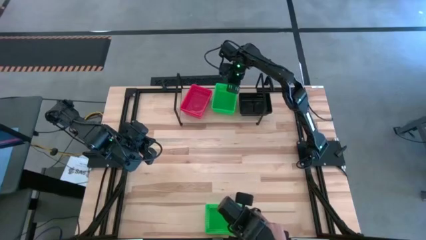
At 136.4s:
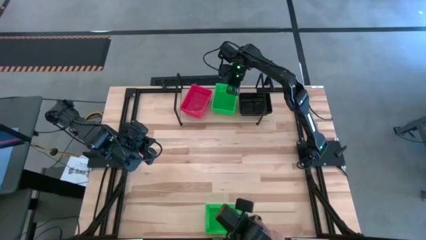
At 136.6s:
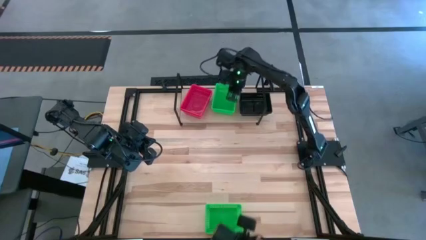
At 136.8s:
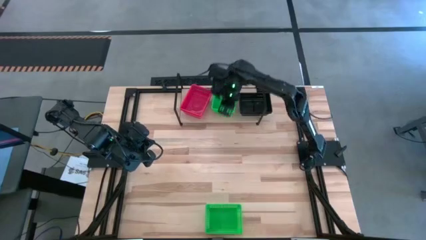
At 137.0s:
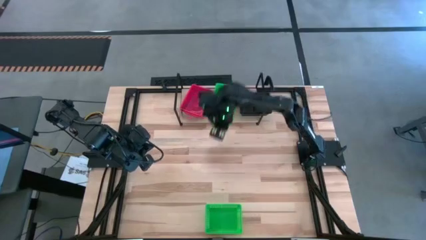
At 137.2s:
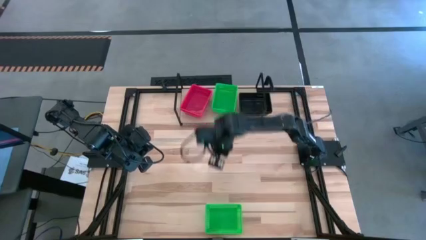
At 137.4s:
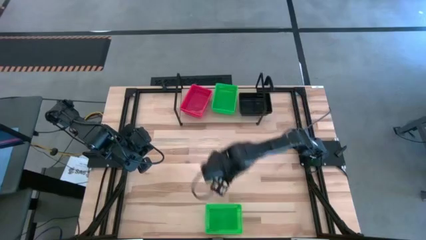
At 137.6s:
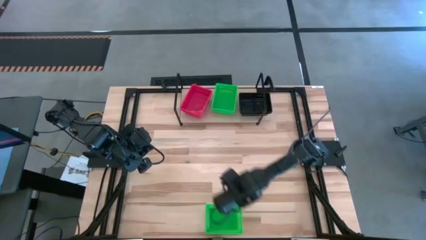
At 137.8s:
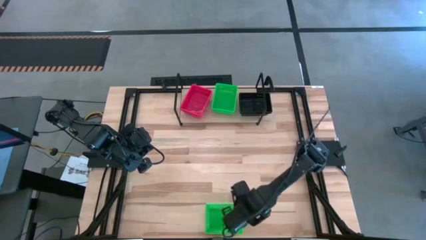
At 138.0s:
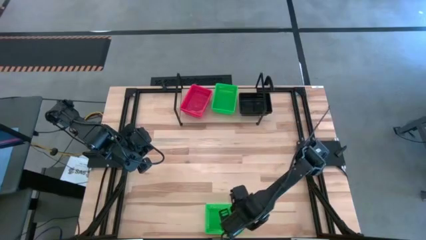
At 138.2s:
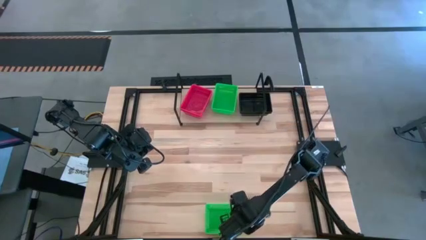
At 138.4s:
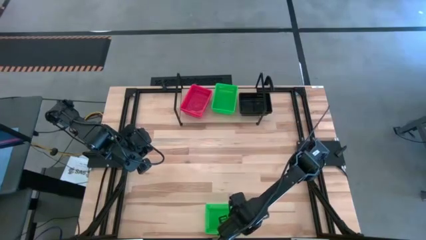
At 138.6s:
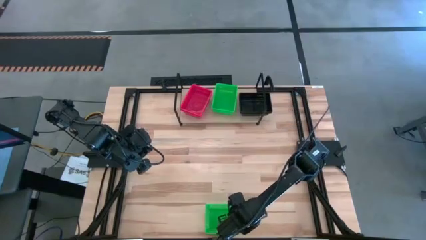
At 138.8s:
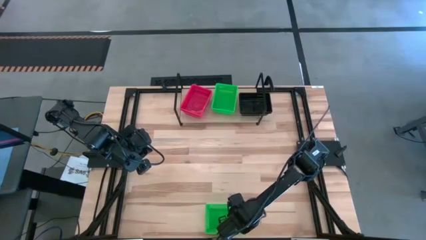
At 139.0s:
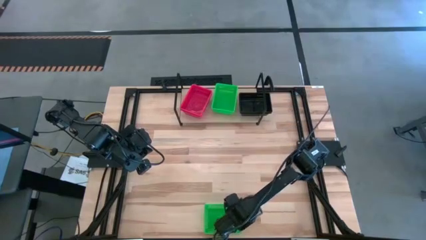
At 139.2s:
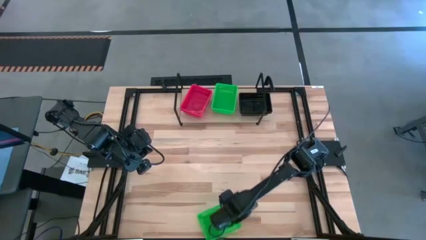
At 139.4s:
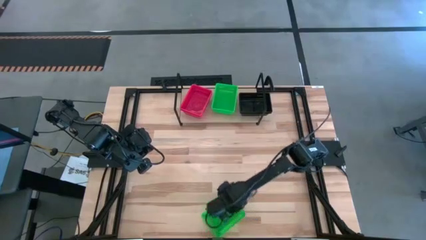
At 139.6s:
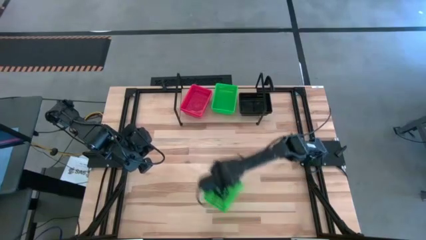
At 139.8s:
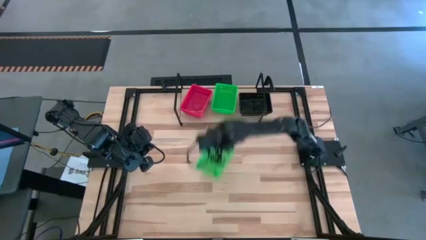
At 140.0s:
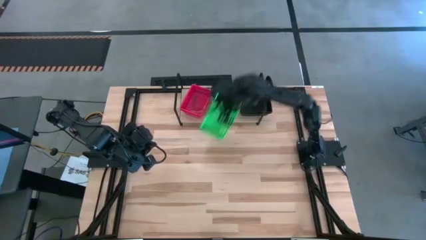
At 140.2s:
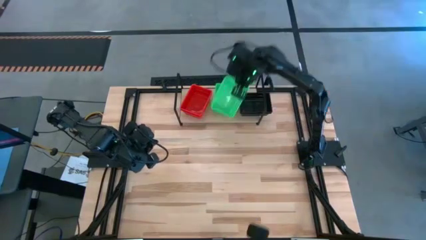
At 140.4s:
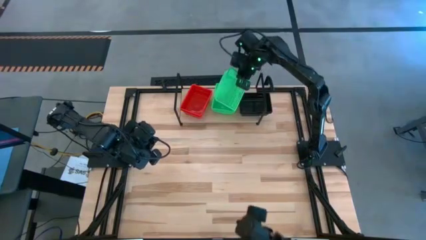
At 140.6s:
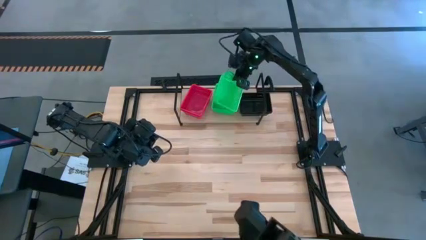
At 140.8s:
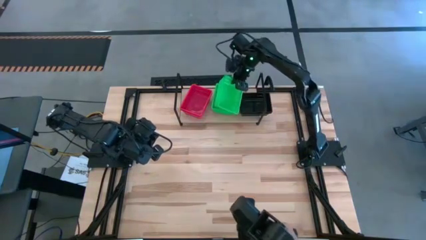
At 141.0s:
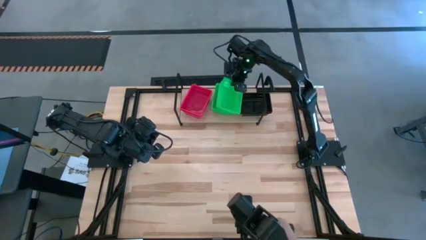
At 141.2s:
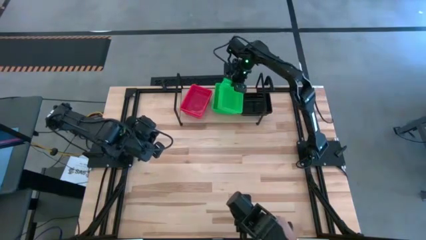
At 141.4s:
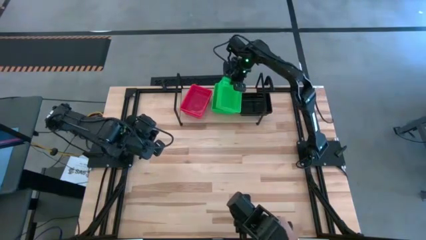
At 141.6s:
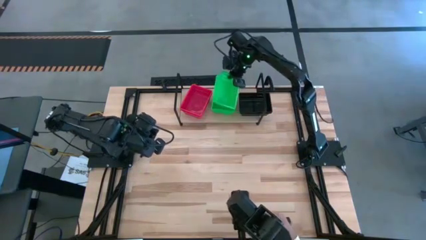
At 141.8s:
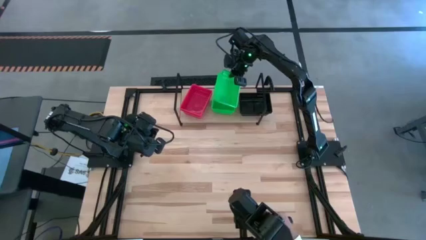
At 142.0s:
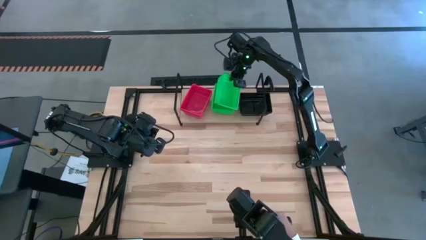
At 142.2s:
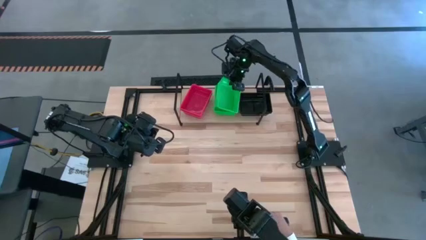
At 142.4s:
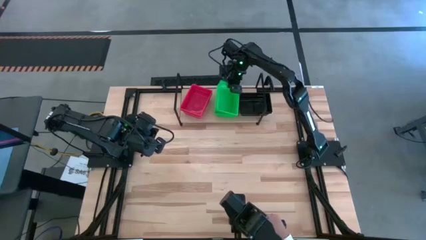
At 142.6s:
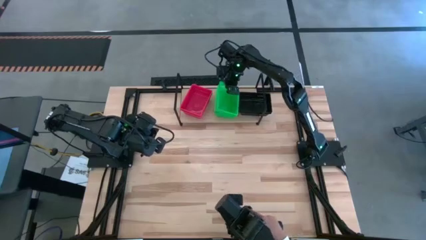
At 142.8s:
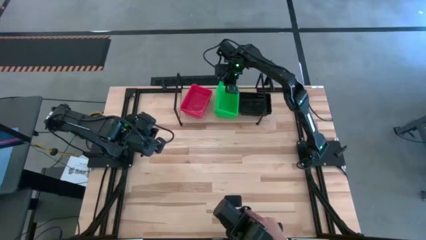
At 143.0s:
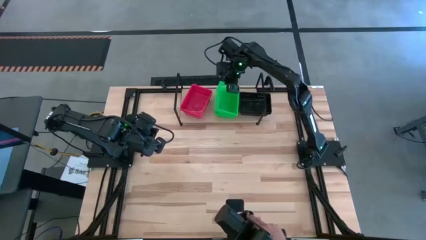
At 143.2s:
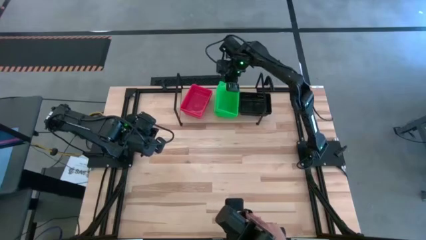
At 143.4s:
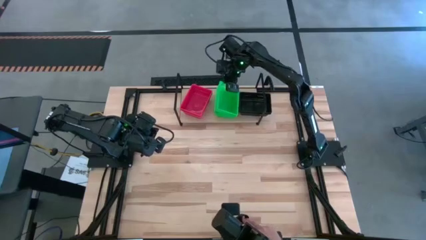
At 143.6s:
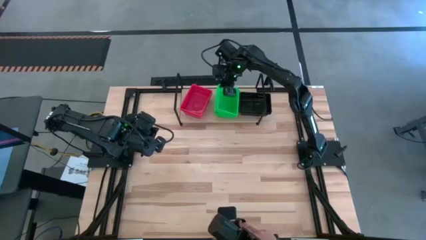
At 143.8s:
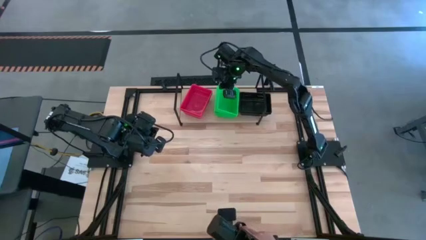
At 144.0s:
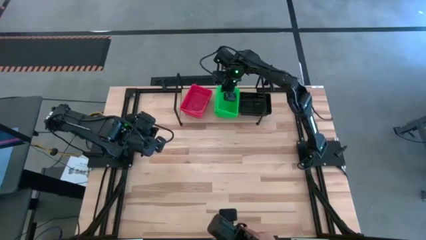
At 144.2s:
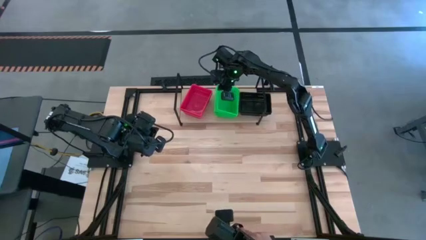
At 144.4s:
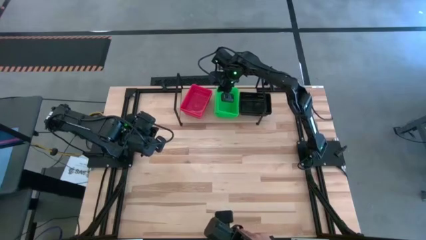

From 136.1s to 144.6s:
Task: Stack baskets on shelf by color
Stack the green bin on top of the other green bins on the shelf

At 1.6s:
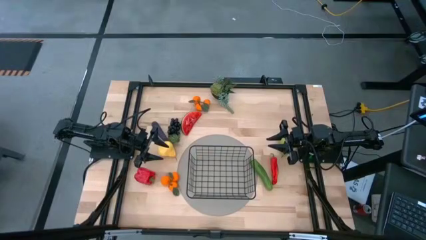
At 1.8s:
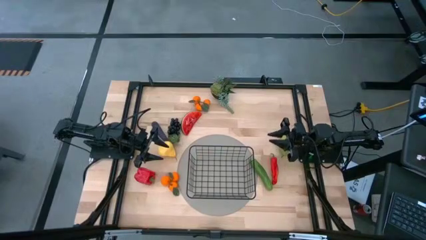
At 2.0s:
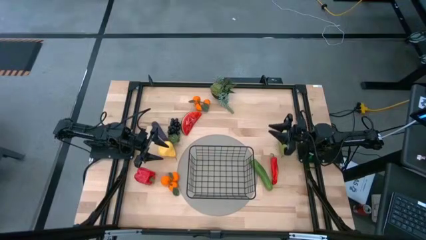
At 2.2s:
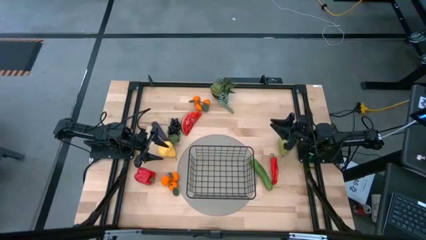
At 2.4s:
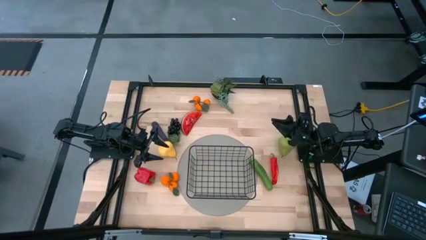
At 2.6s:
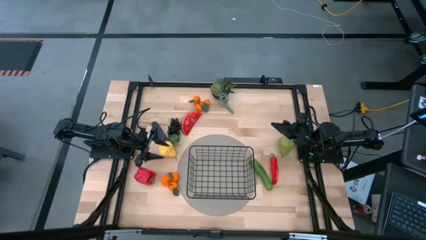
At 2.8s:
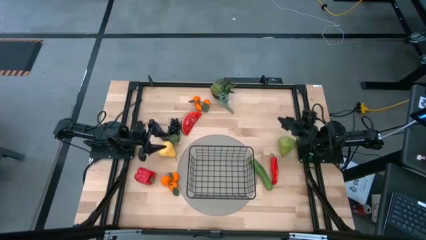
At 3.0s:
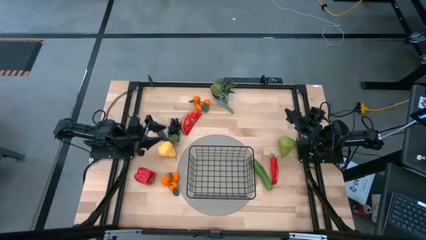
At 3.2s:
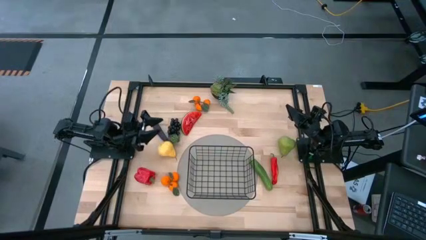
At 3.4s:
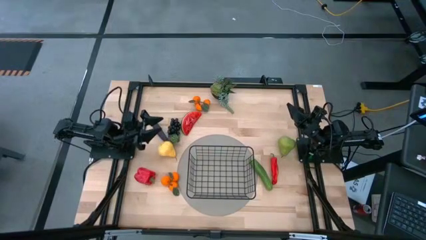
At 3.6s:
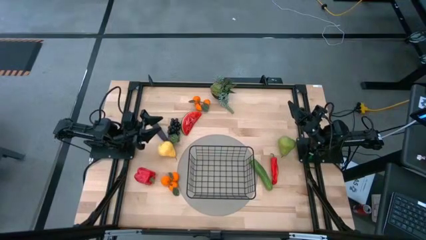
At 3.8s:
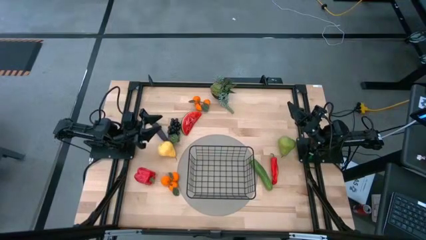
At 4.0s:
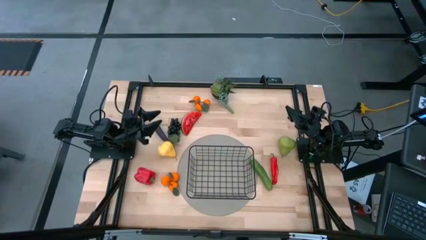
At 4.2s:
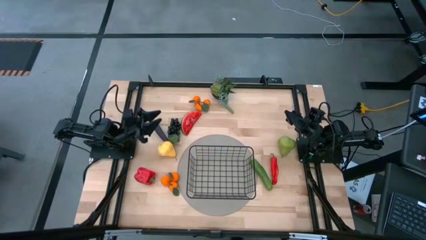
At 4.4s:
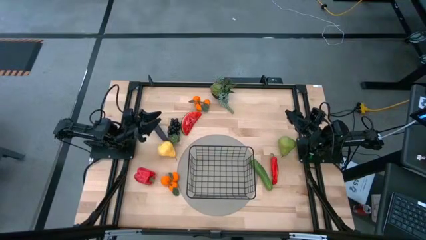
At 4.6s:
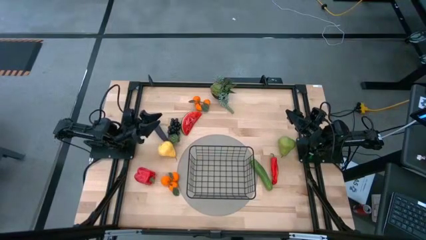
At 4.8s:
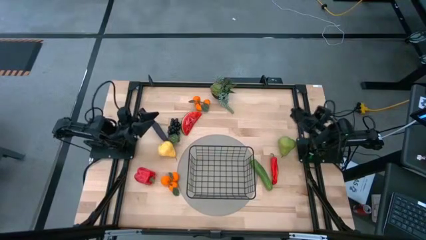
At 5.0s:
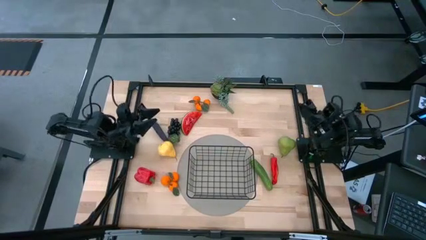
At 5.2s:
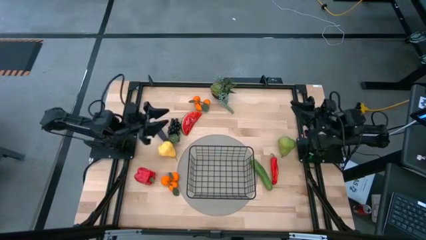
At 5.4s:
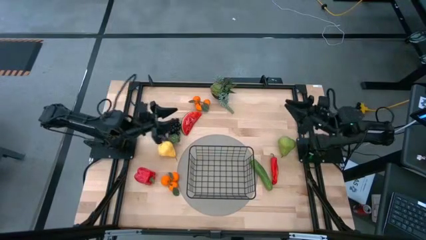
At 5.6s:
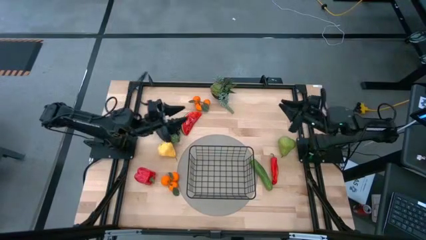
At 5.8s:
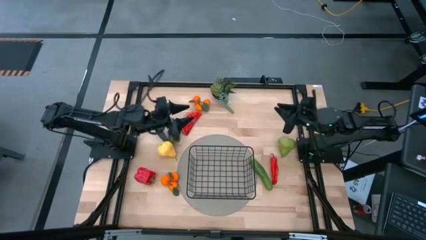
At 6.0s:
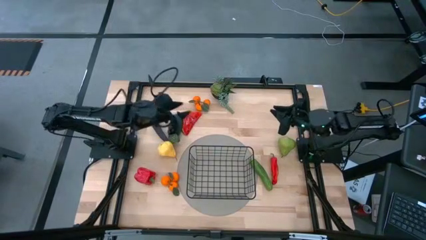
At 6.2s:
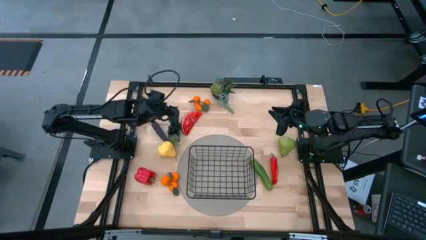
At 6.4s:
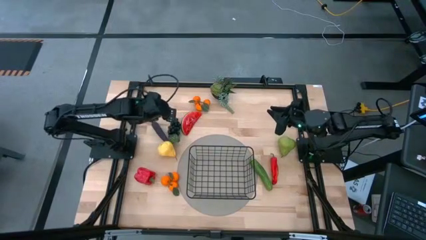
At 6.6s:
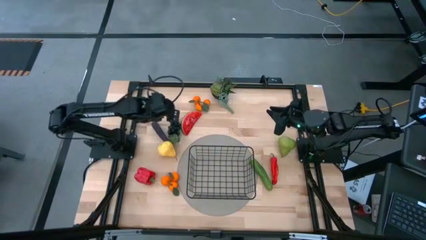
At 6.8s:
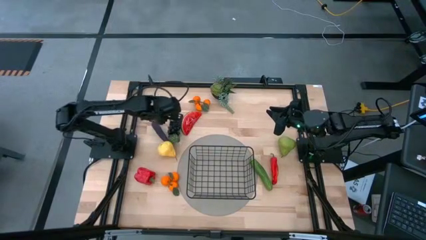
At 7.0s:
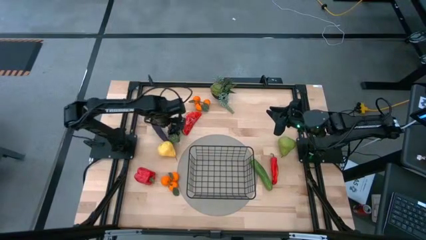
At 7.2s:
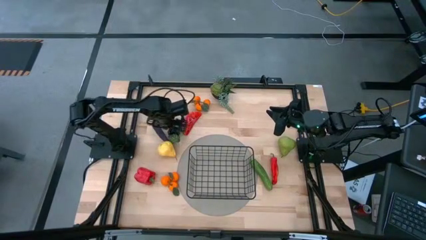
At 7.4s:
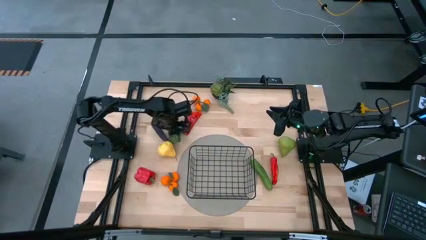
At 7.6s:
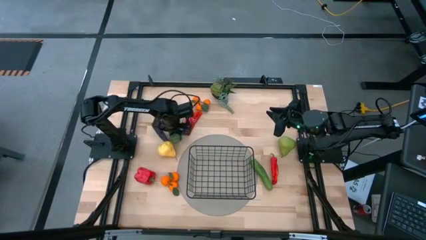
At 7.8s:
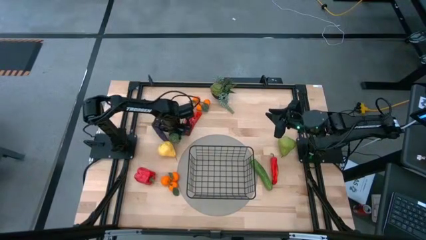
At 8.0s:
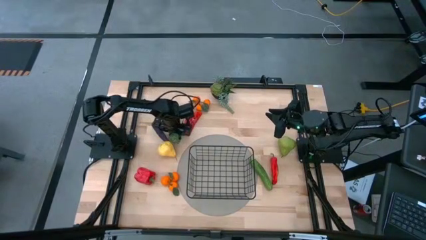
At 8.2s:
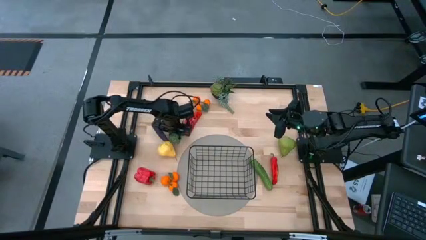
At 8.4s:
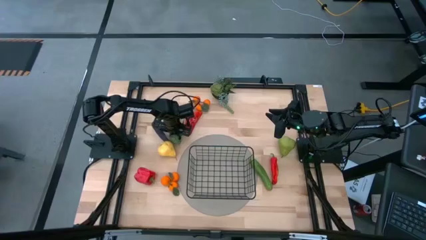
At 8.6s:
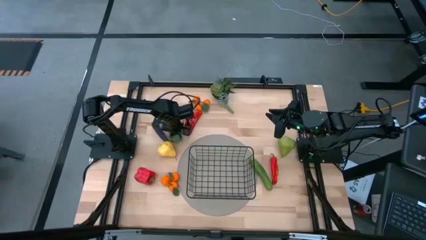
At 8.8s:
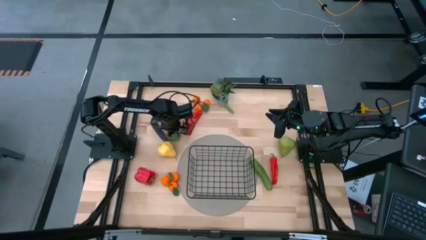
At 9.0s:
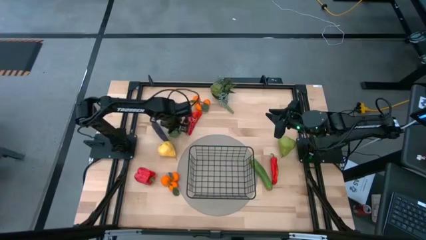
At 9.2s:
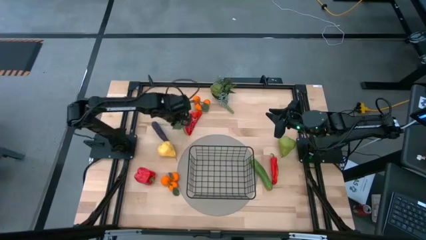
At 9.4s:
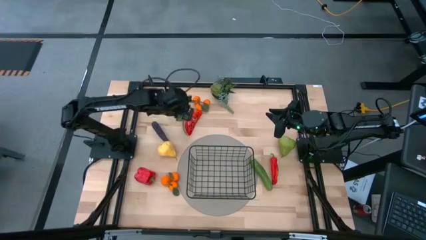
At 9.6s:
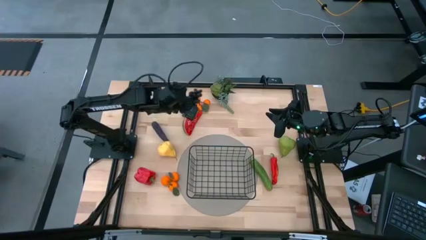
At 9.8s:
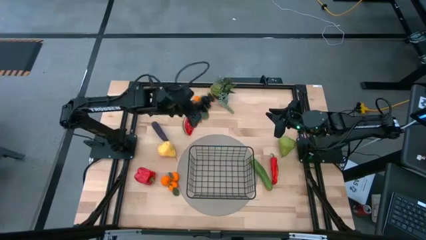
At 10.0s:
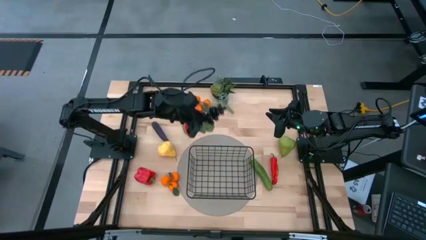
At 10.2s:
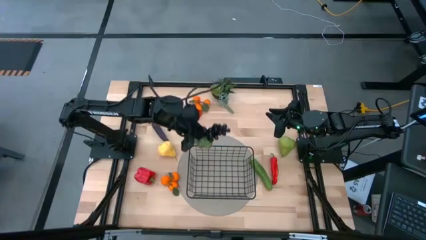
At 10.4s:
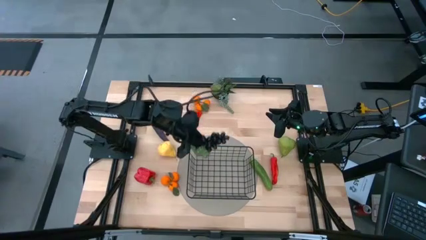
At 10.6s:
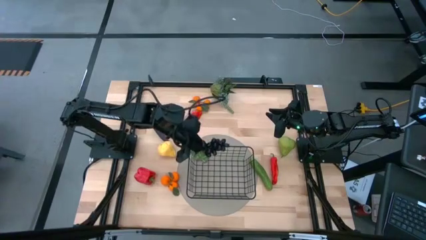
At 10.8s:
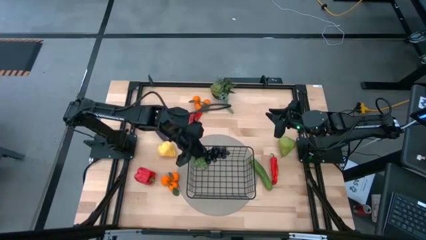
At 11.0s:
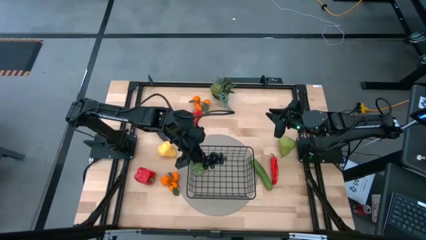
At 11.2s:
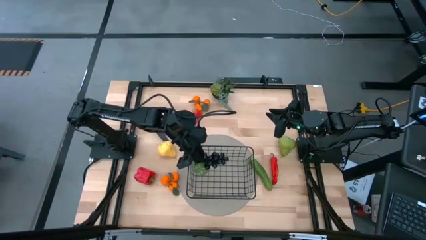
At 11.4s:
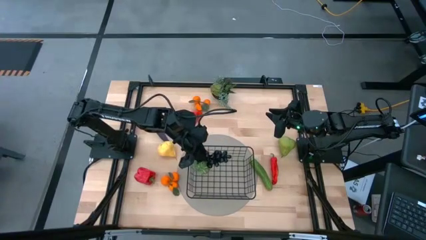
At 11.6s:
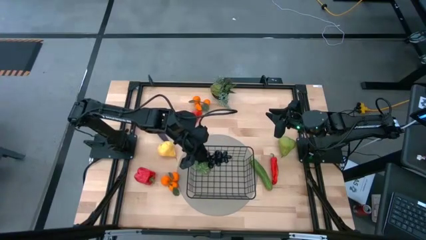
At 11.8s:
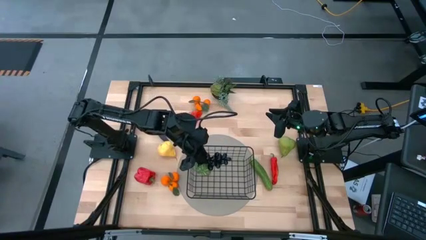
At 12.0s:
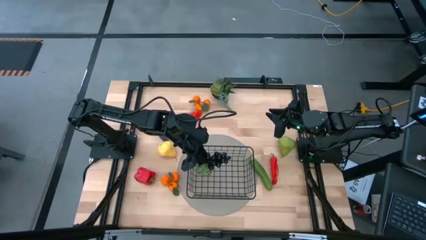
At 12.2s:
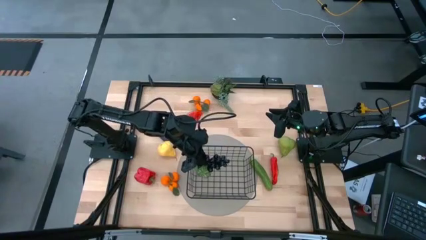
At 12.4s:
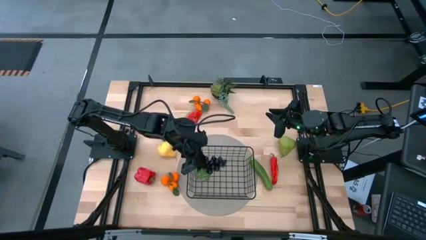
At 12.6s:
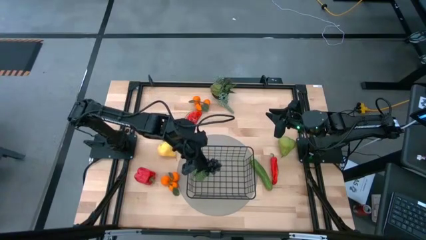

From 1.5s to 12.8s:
Task: Build produce basket
Put the black grapes into the black wire basket
